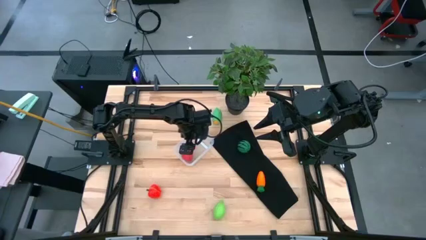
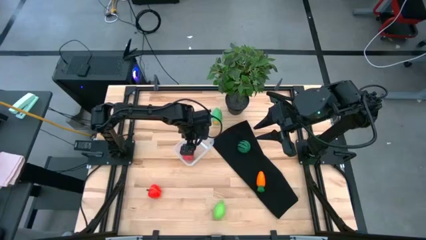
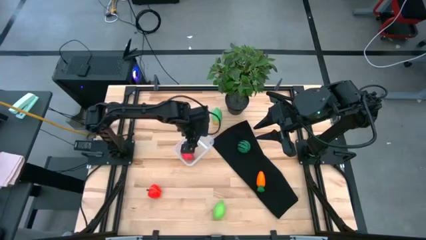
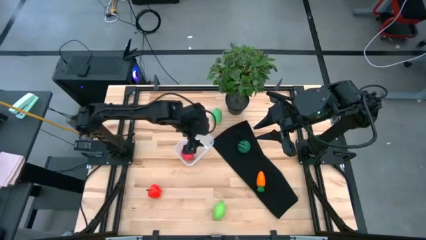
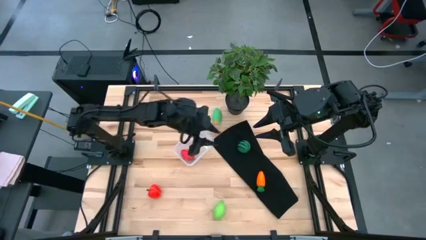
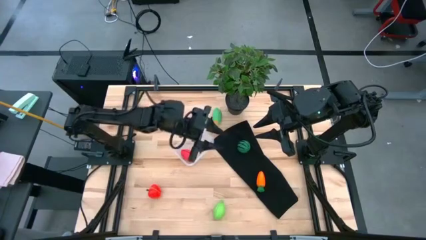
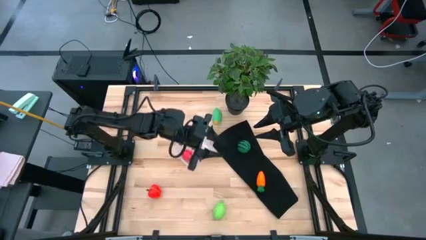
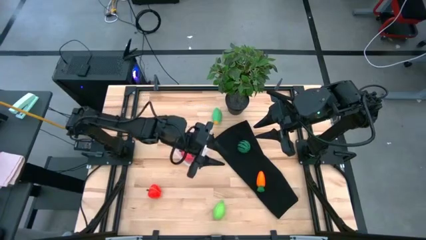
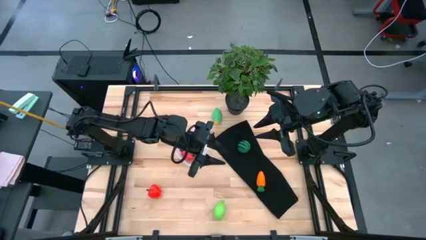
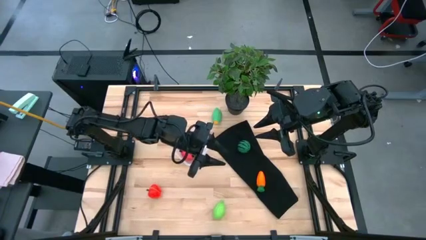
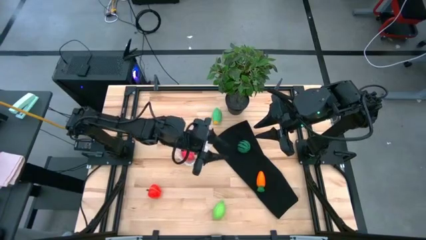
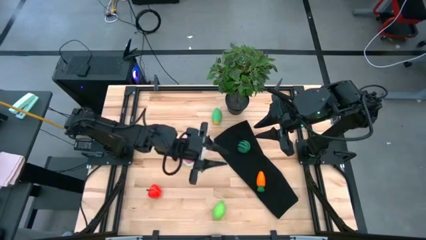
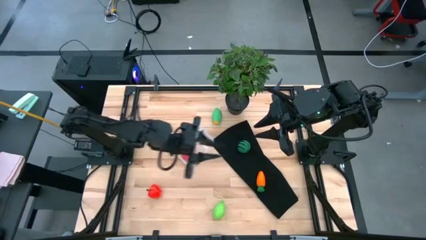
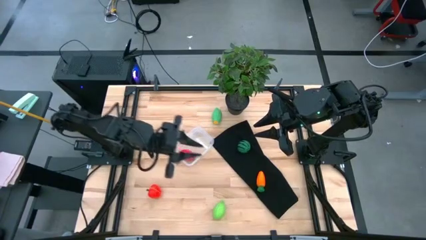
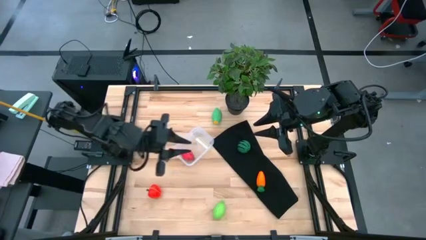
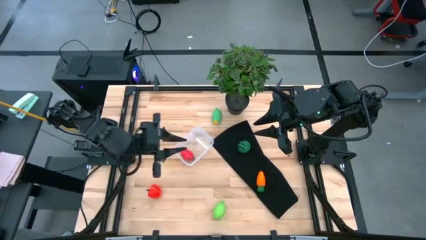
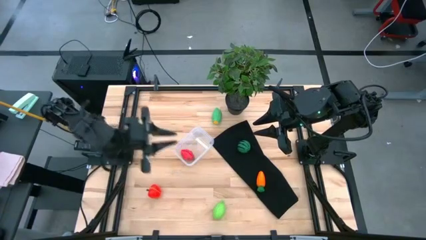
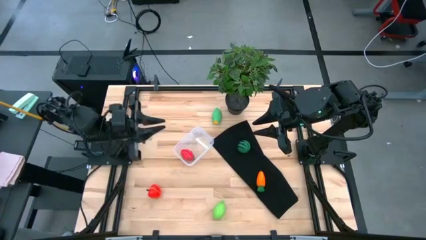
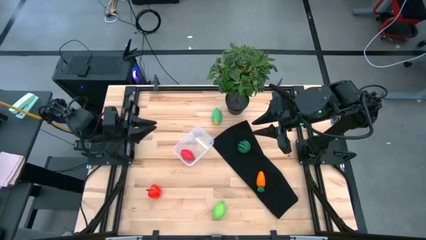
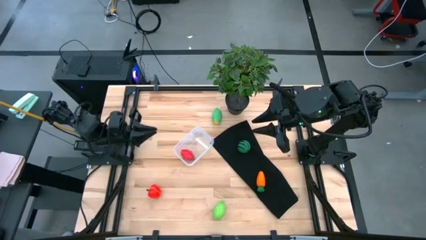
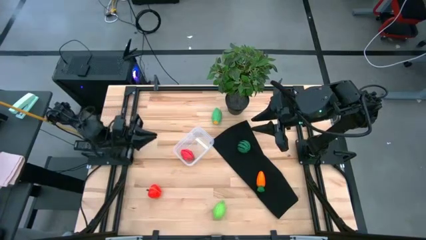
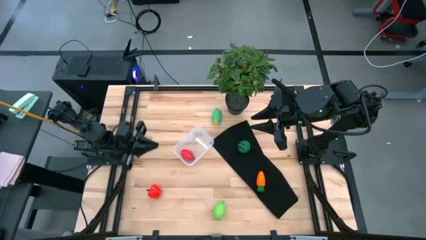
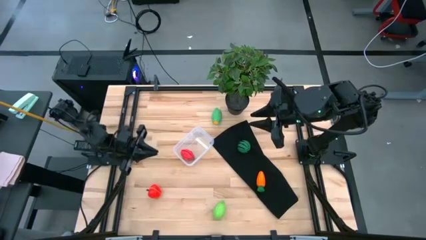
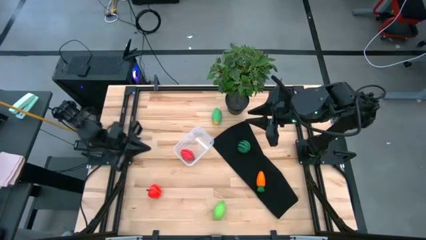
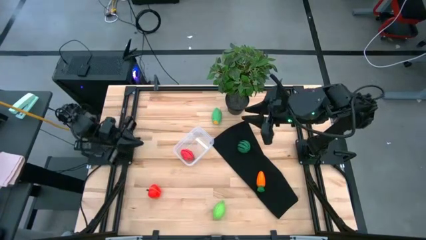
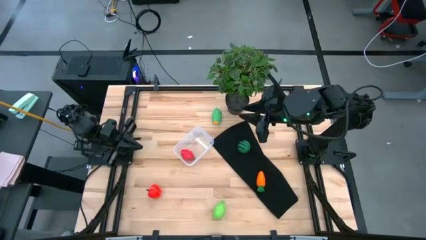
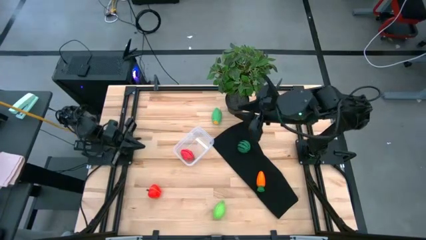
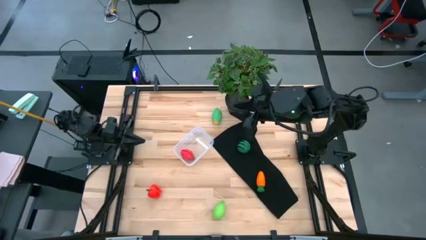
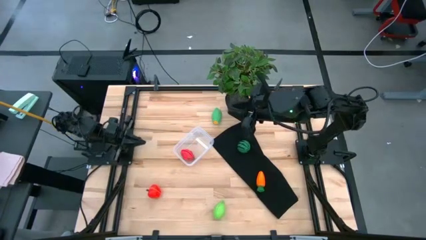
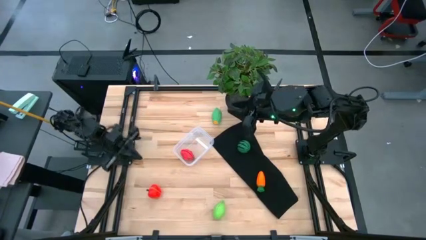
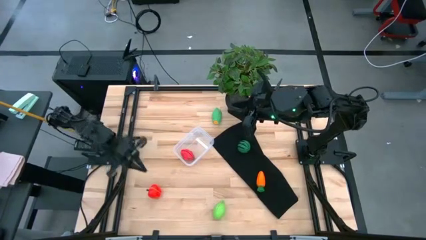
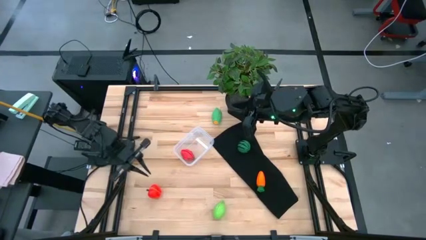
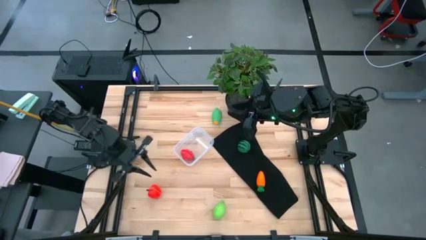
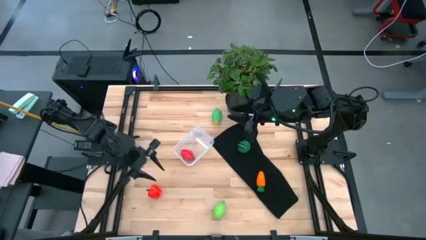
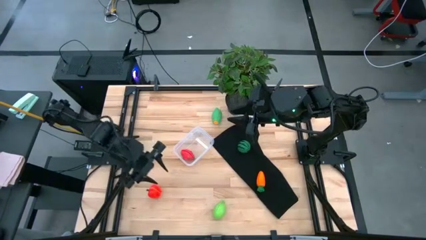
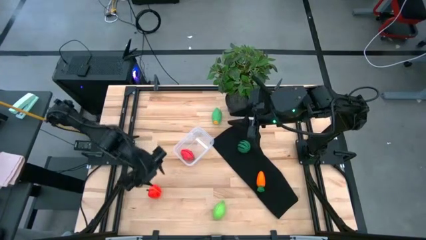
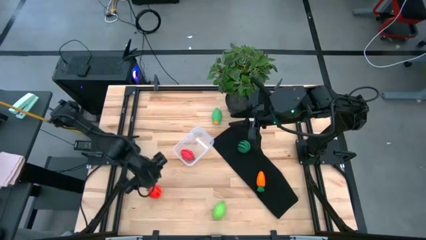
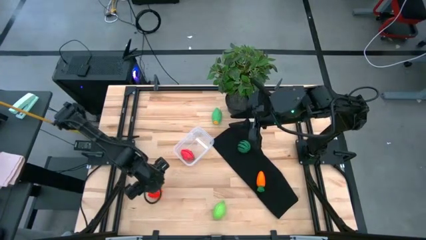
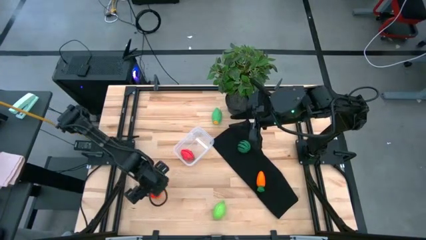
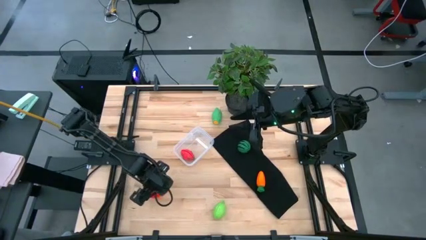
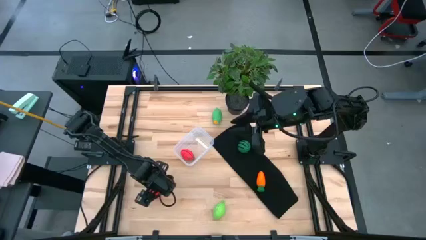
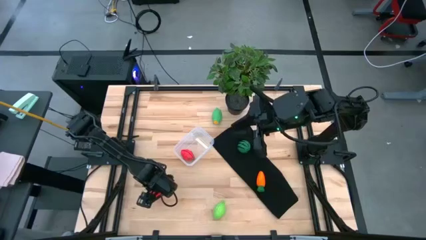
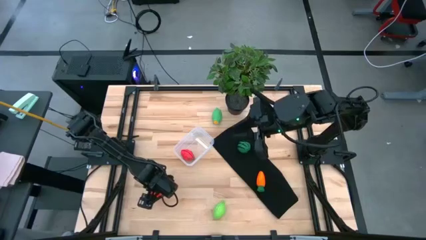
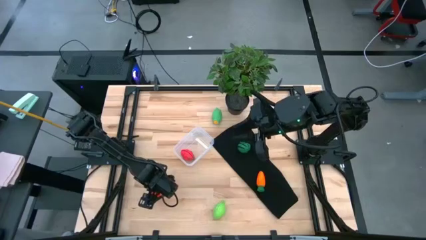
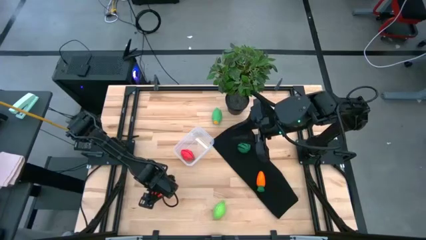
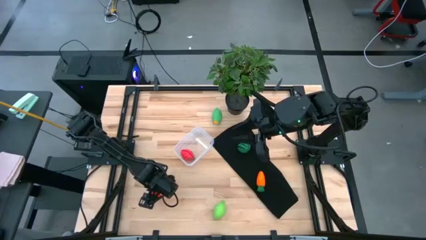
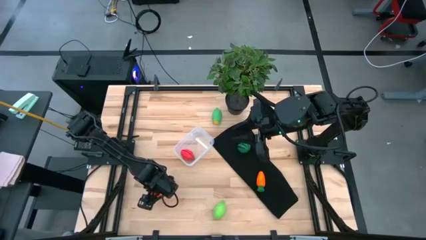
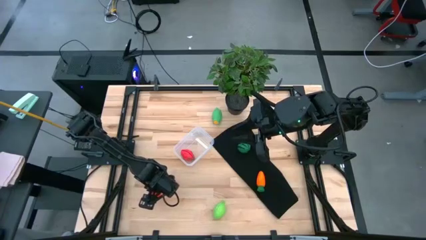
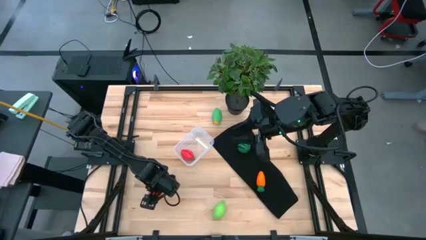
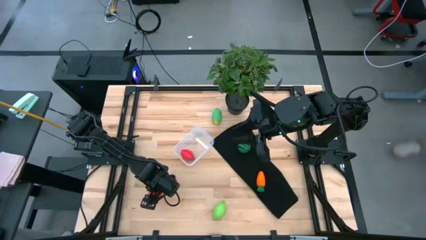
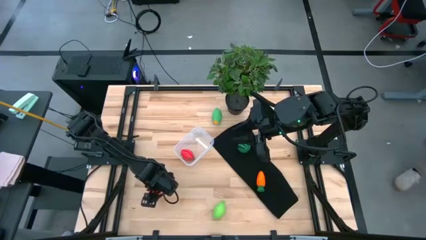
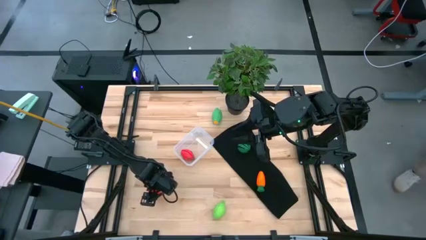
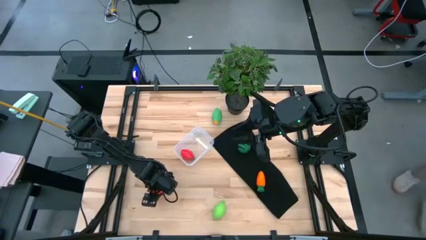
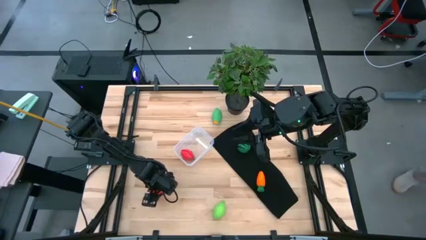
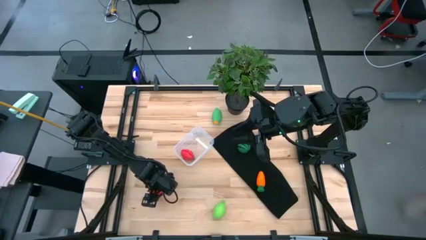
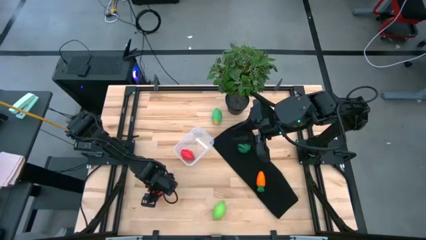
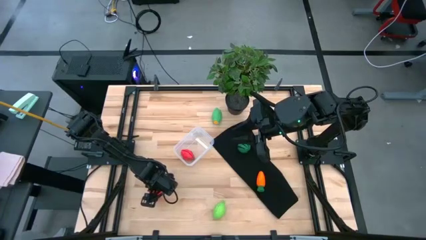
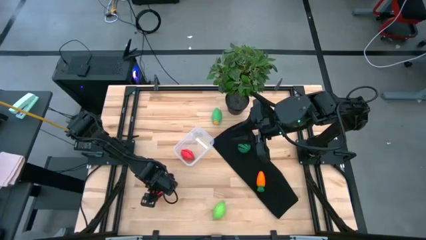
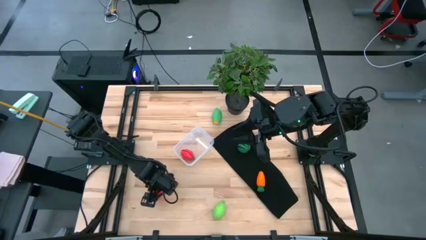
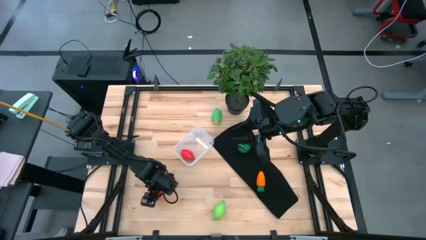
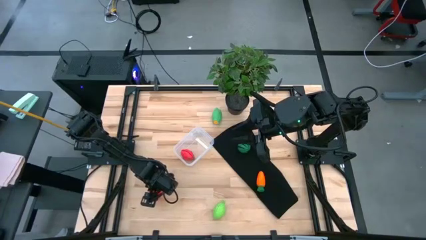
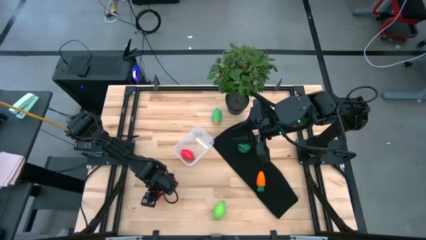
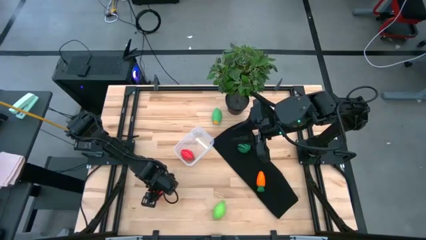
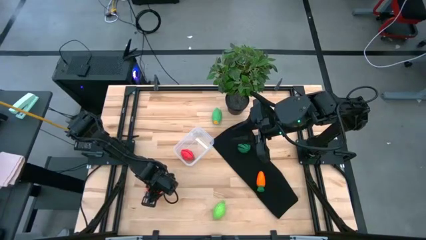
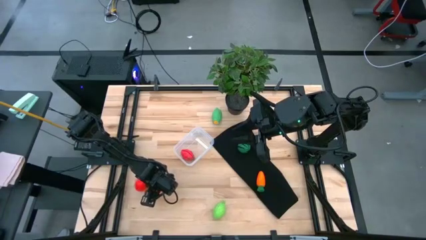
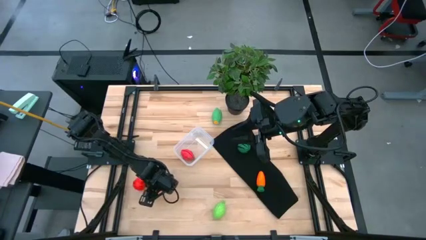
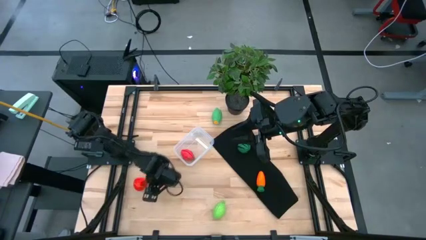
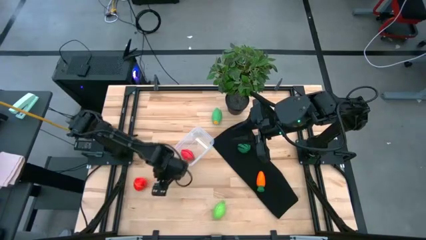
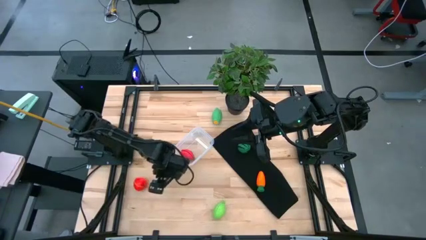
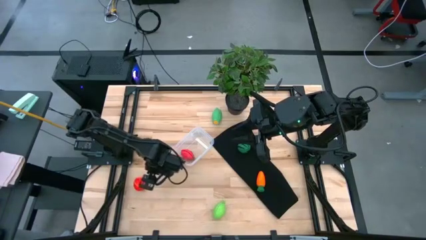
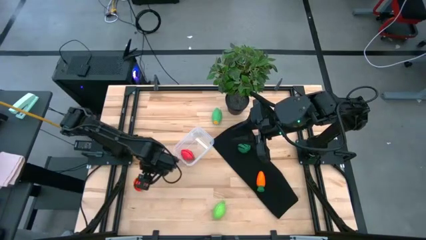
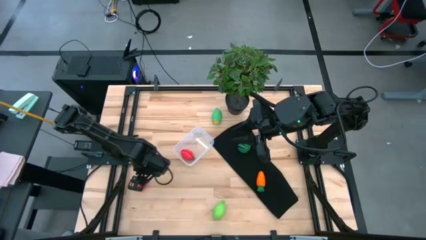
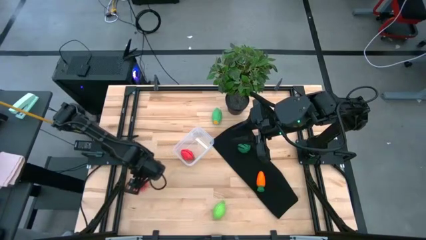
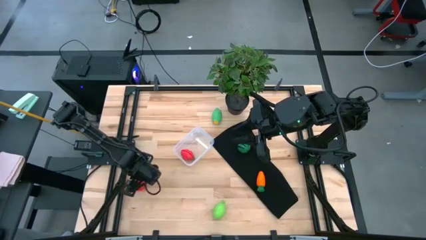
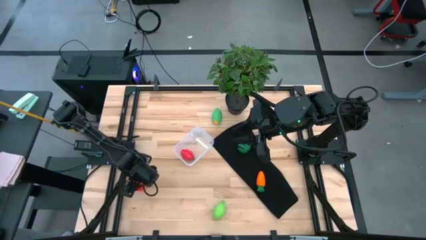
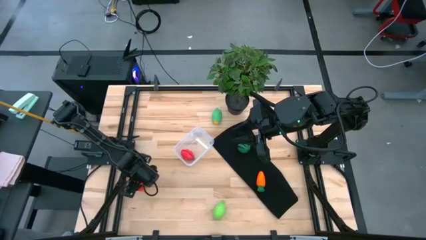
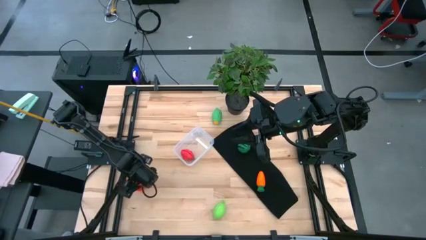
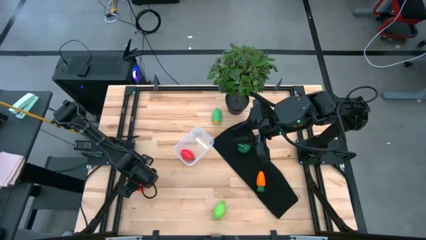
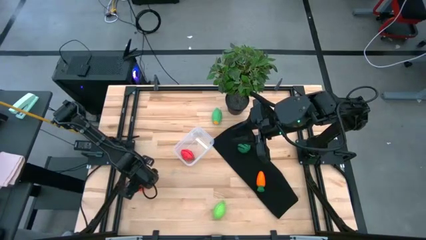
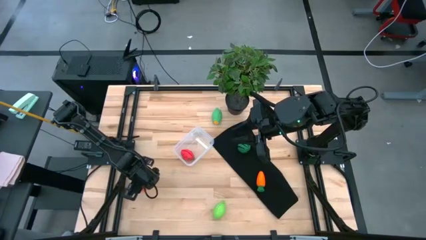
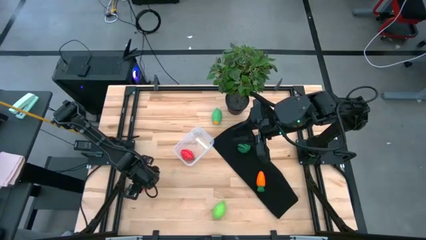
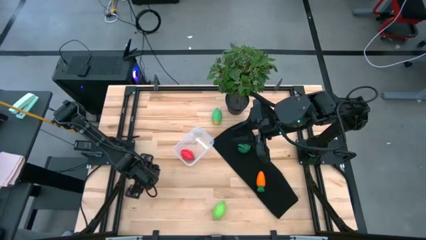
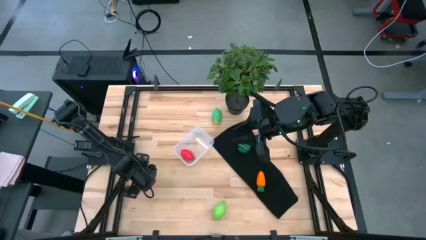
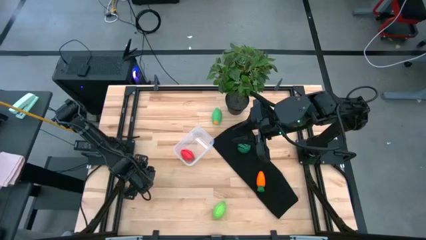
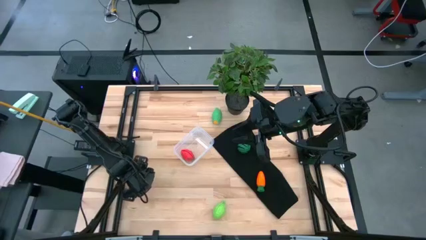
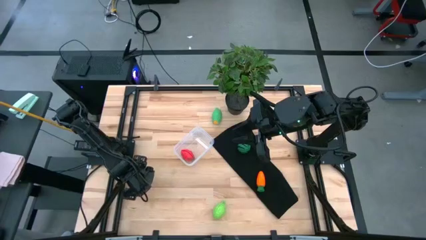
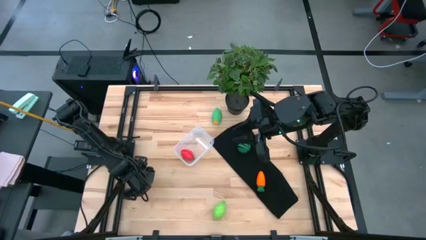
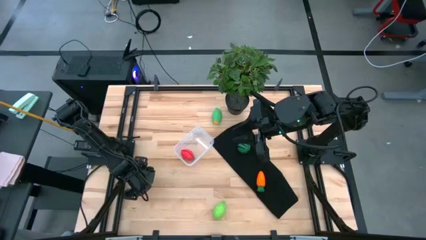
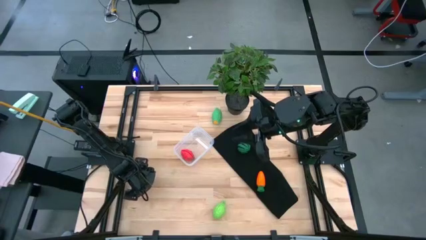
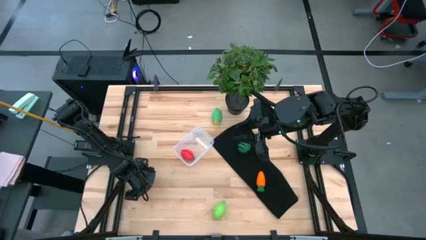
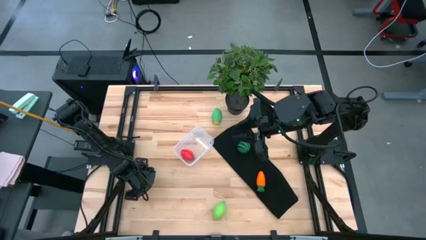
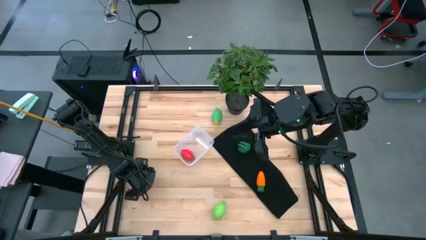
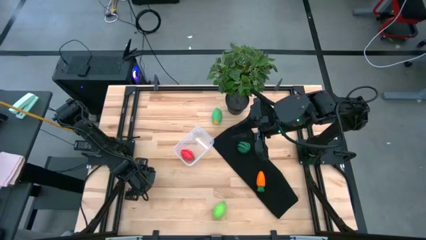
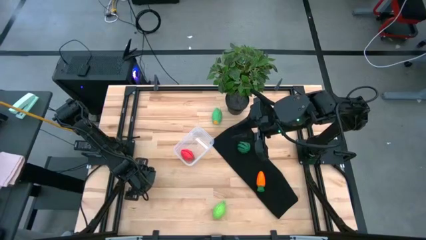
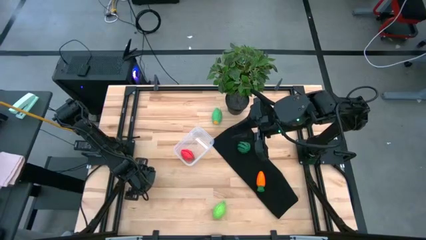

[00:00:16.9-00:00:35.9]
Task: Pick and placing Produce into tupperware
Put the red apple into the transparent bin
